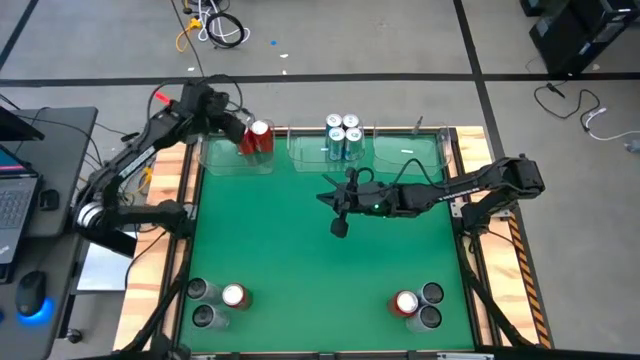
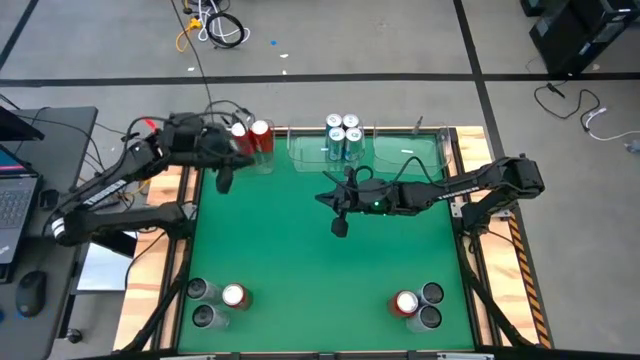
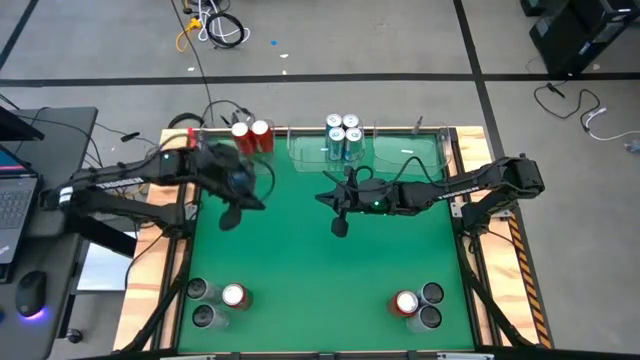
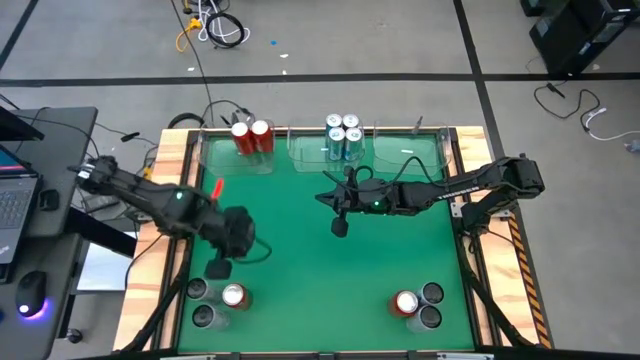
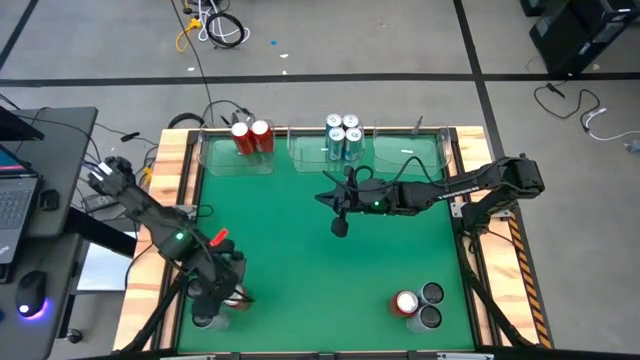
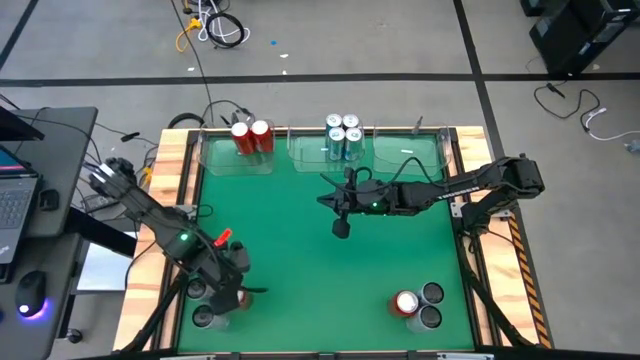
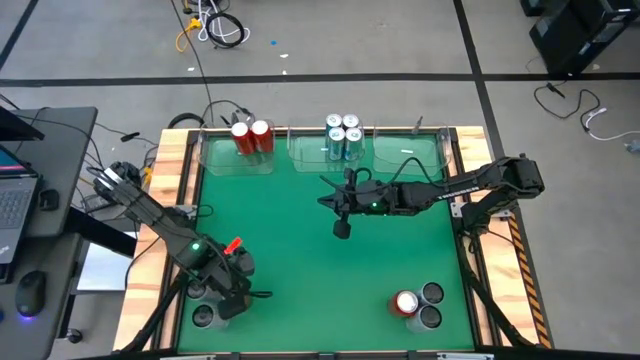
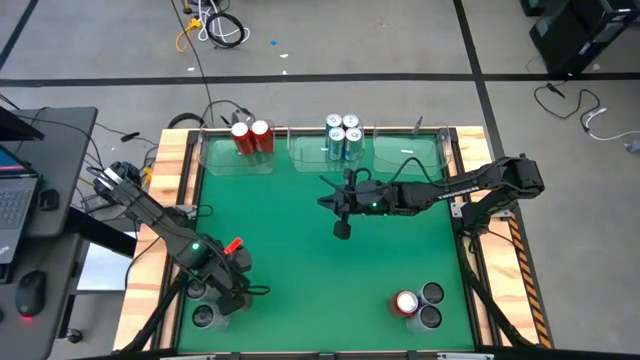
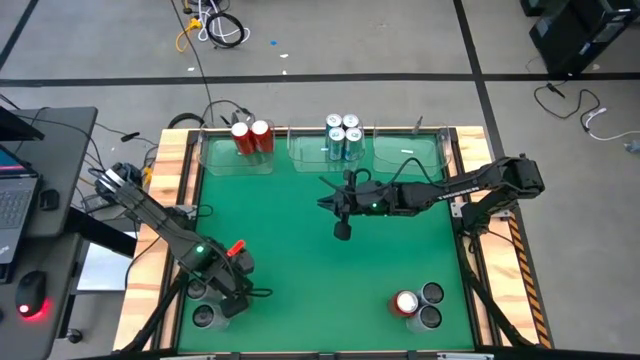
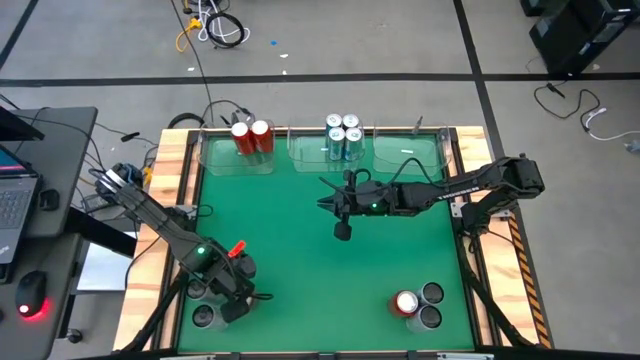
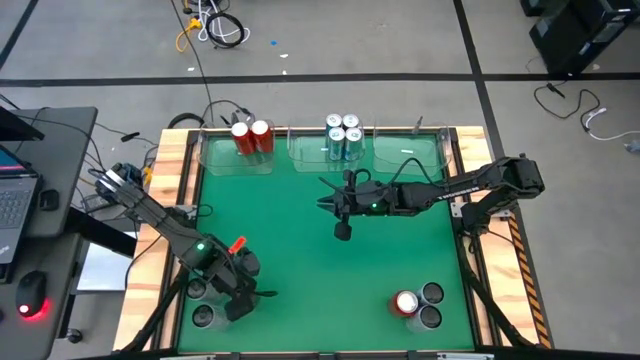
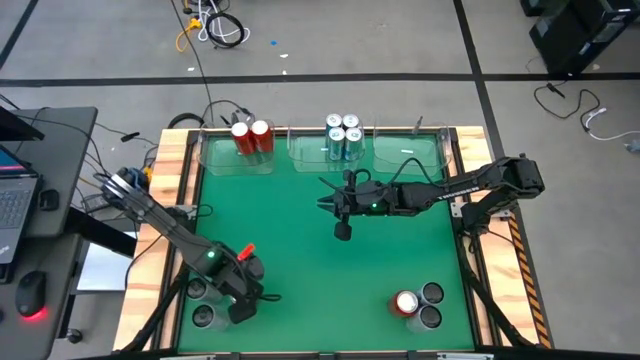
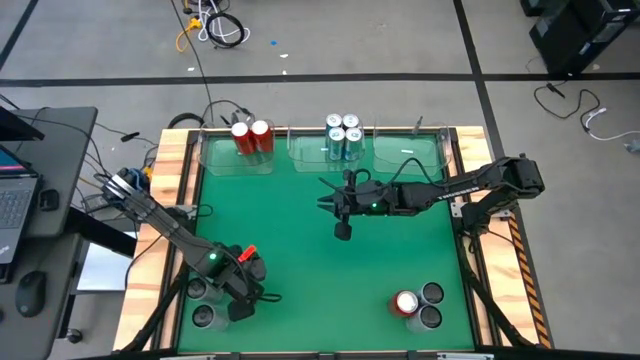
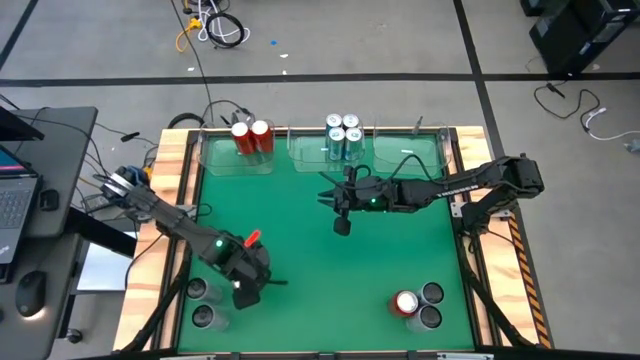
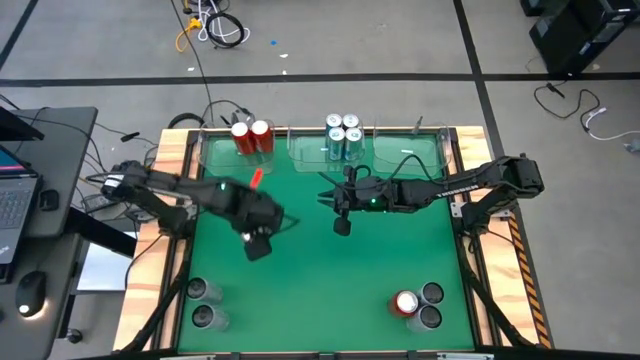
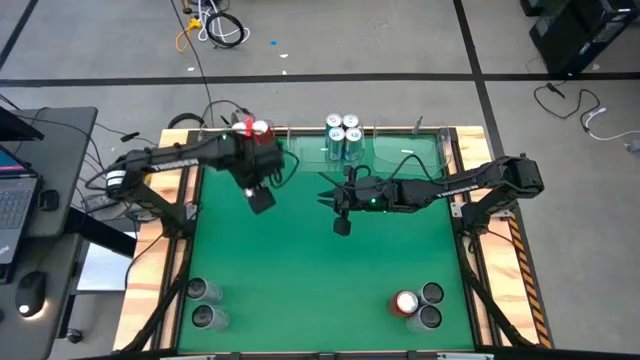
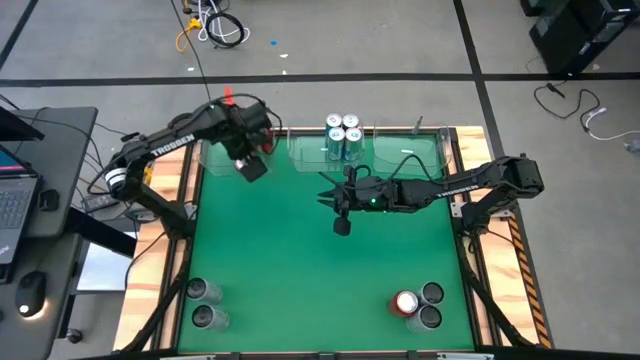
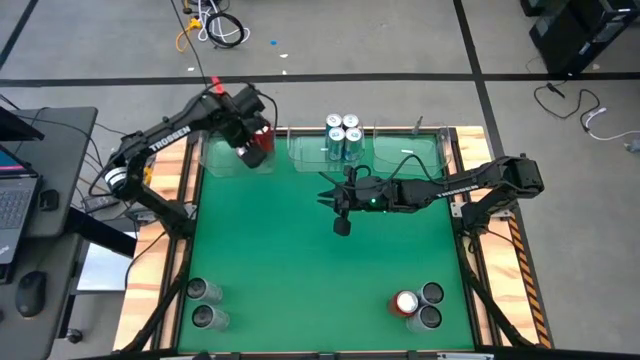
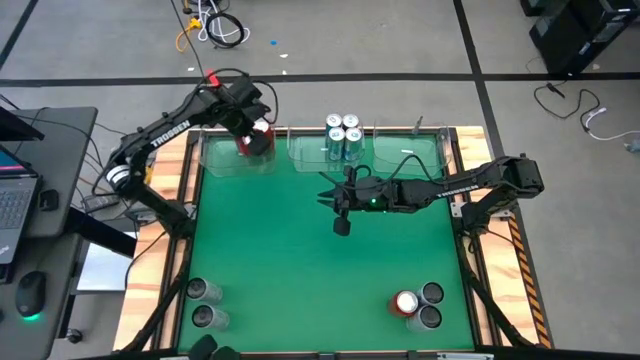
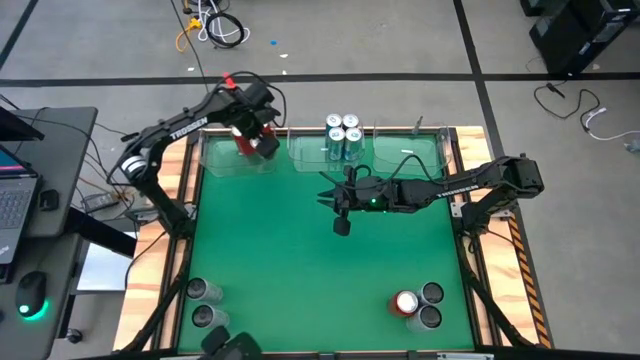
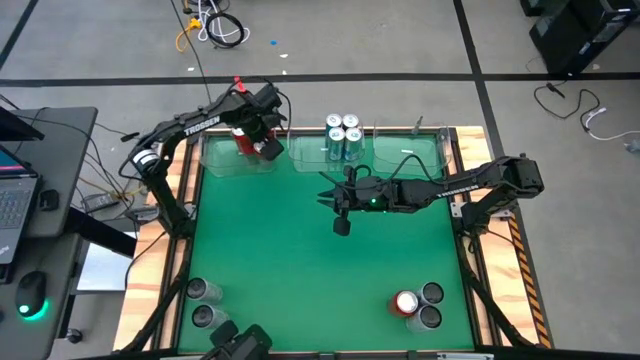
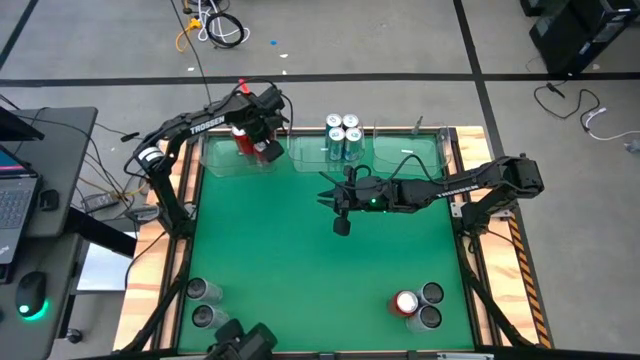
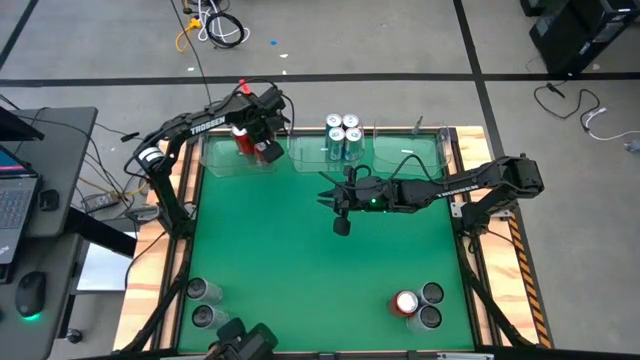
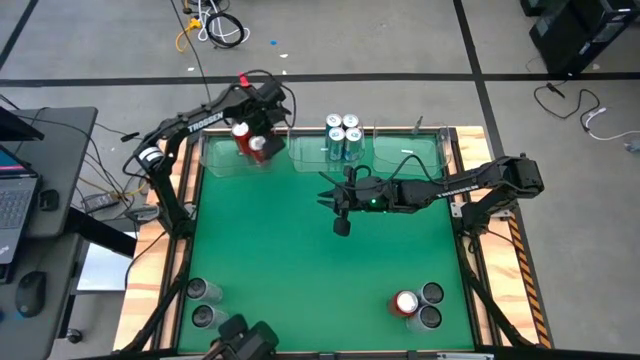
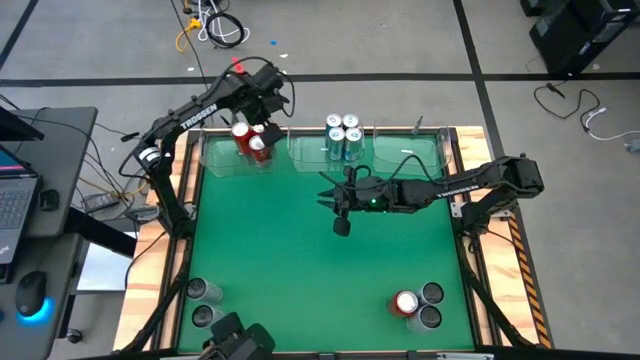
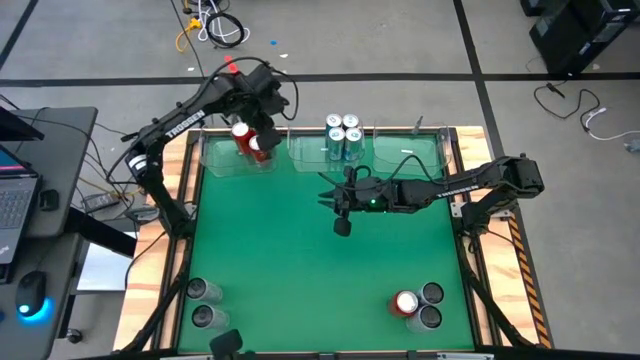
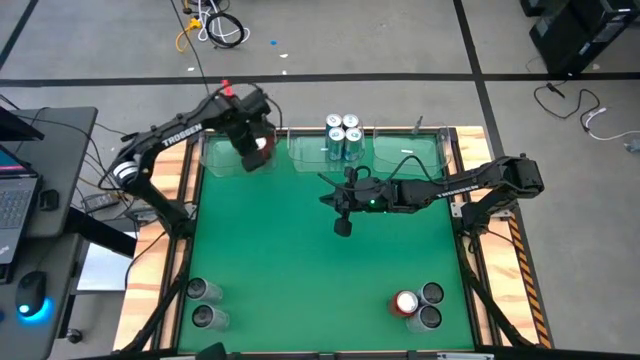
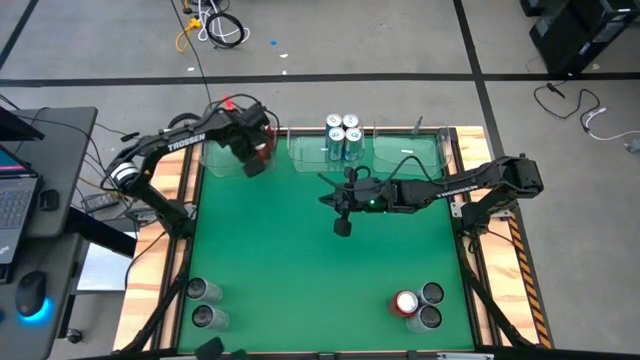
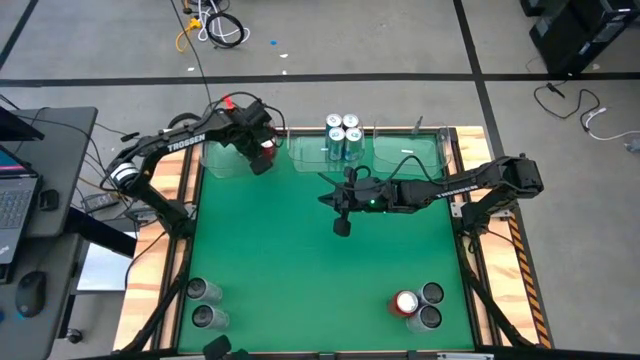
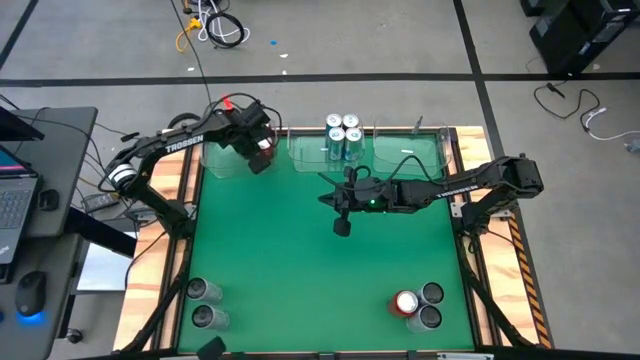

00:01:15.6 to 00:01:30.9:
Task: Sort soda cans
Put the red soda can into the transparent left bin

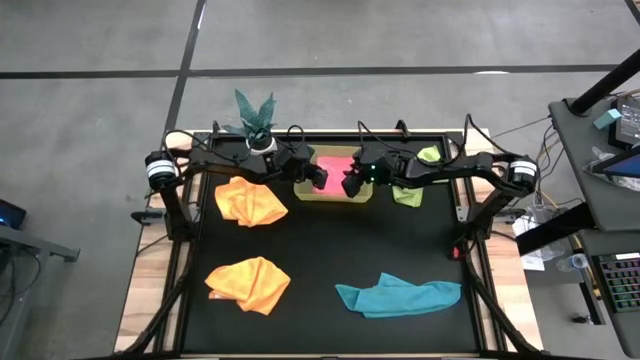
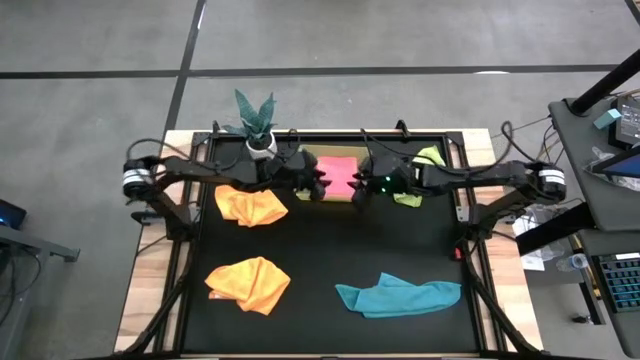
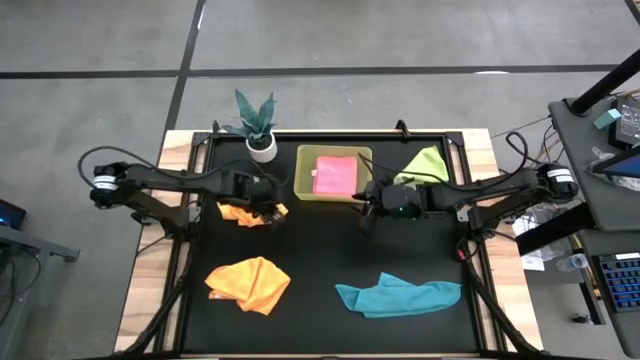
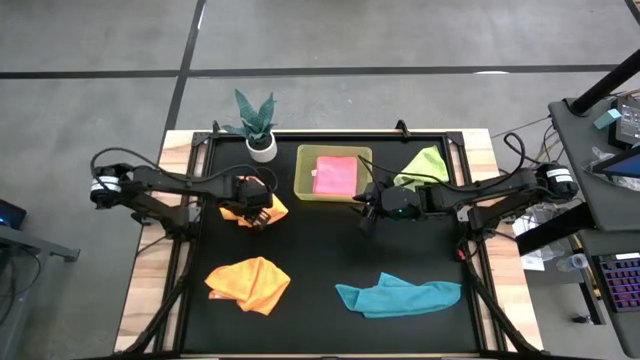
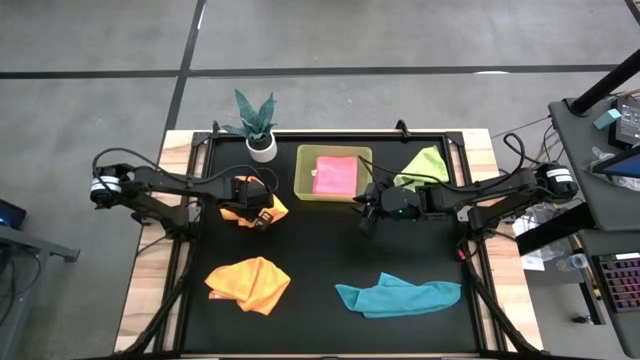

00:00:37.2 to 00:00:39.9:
Task: Fold microfiber towels
Fold the top yellow towel on the table
